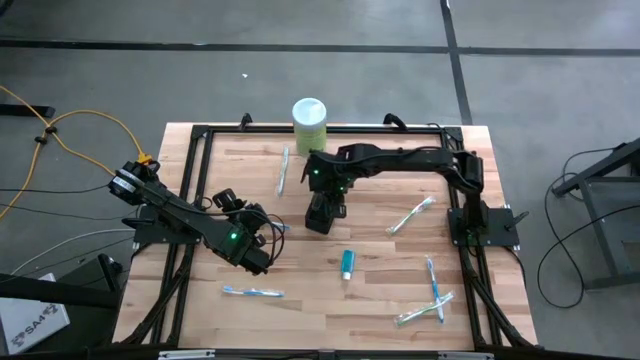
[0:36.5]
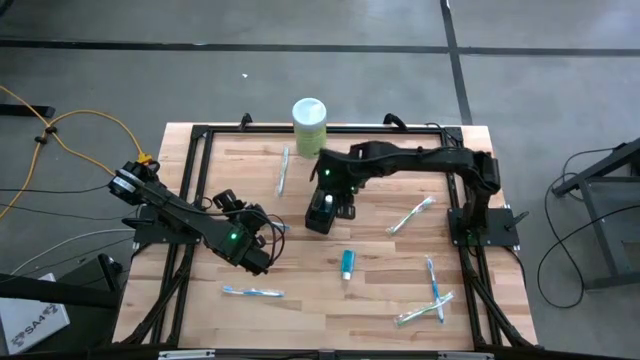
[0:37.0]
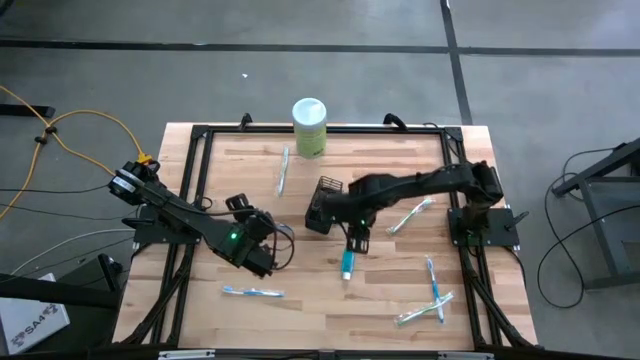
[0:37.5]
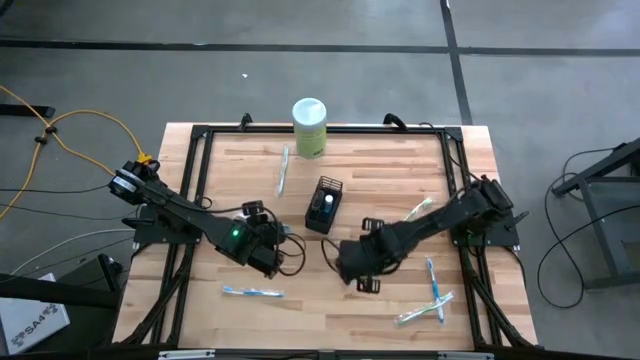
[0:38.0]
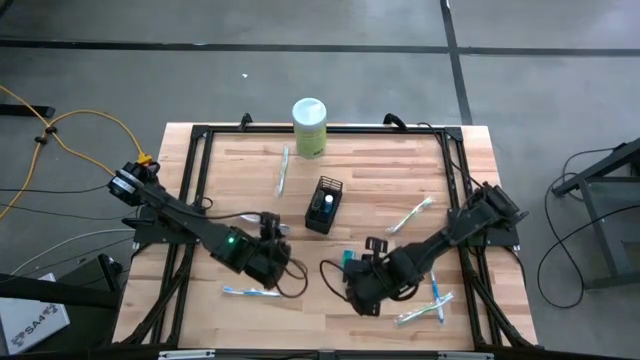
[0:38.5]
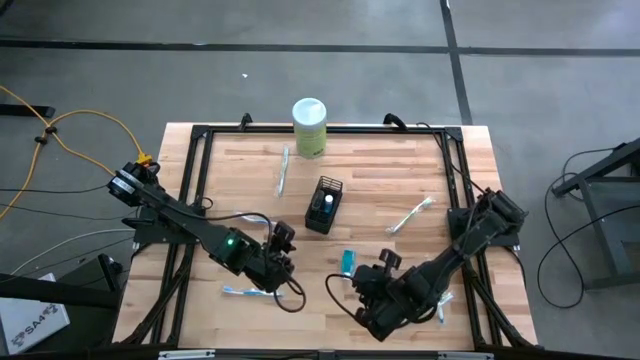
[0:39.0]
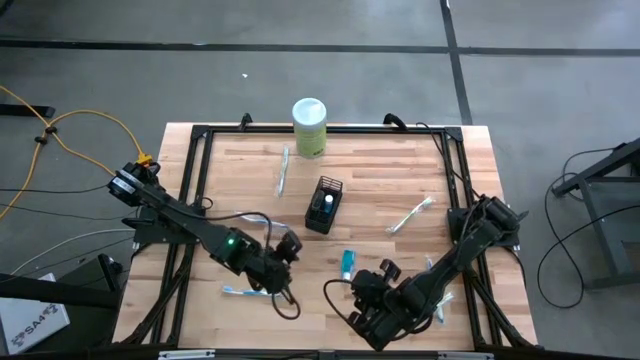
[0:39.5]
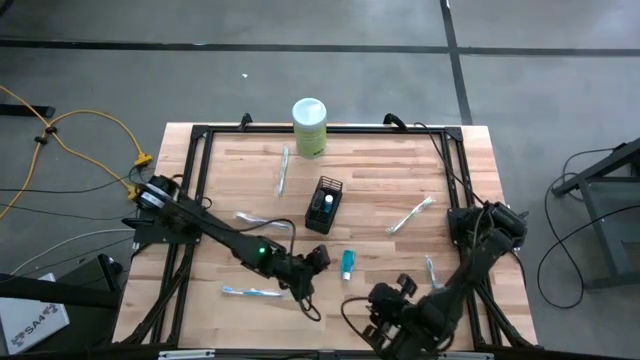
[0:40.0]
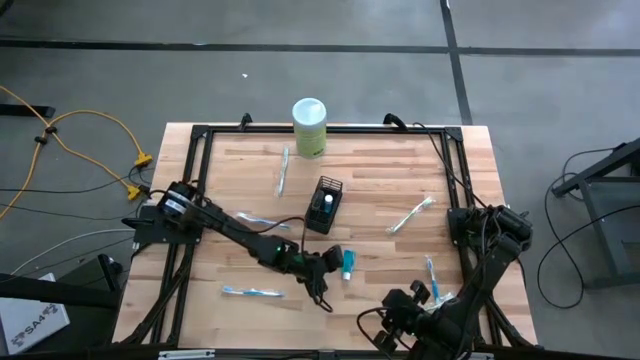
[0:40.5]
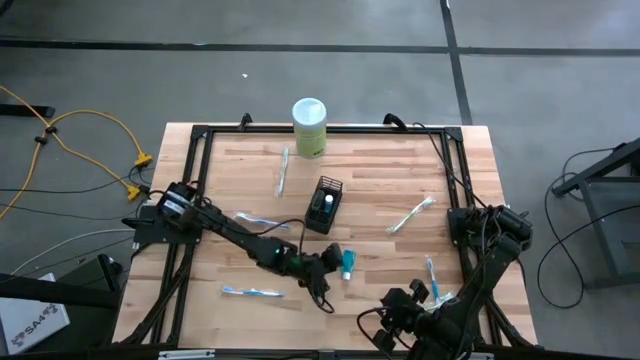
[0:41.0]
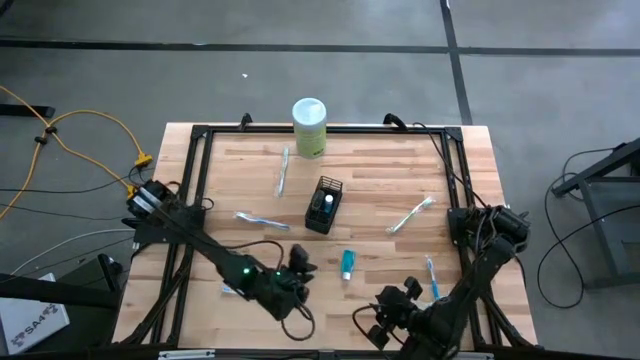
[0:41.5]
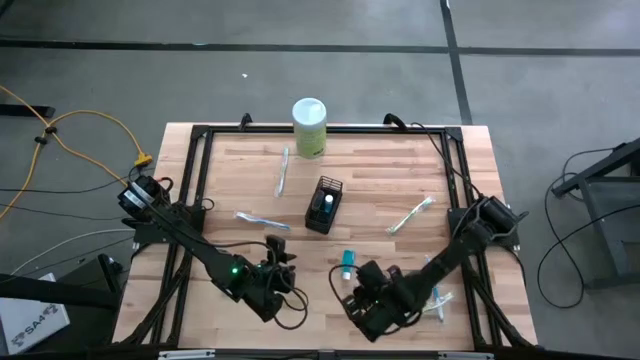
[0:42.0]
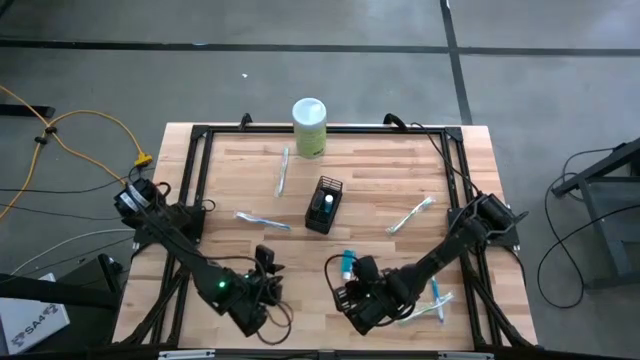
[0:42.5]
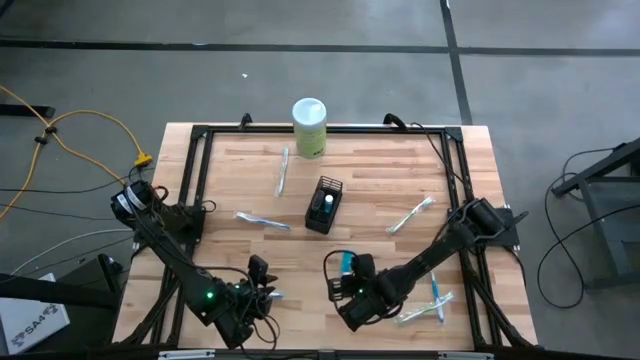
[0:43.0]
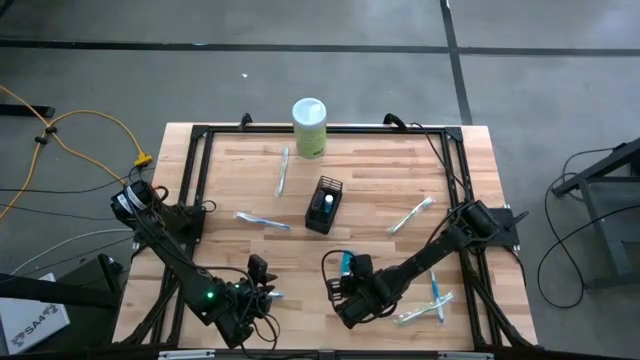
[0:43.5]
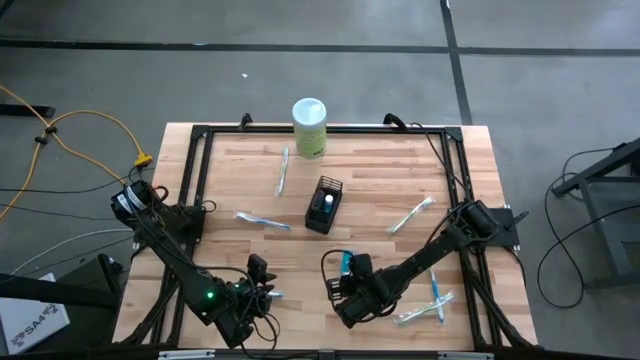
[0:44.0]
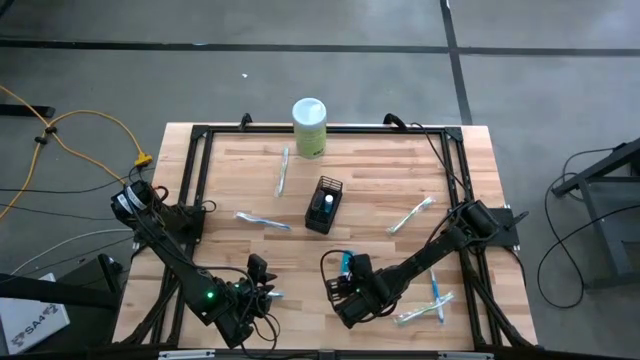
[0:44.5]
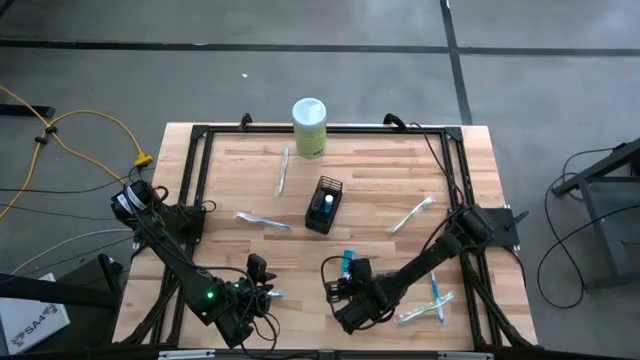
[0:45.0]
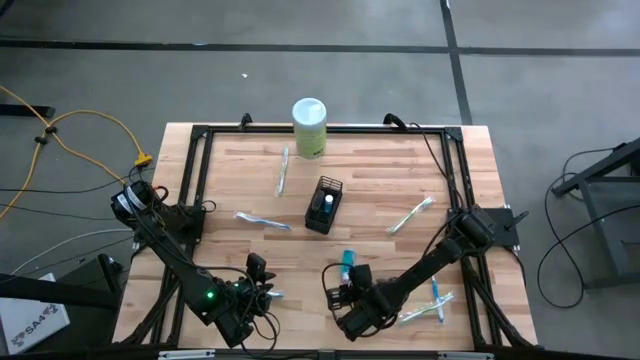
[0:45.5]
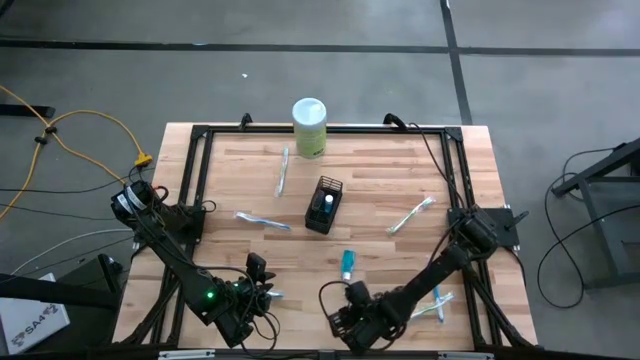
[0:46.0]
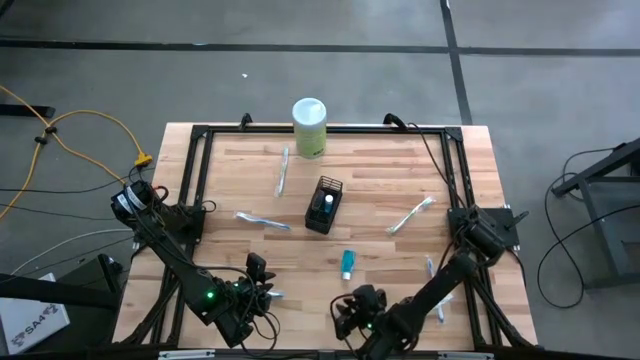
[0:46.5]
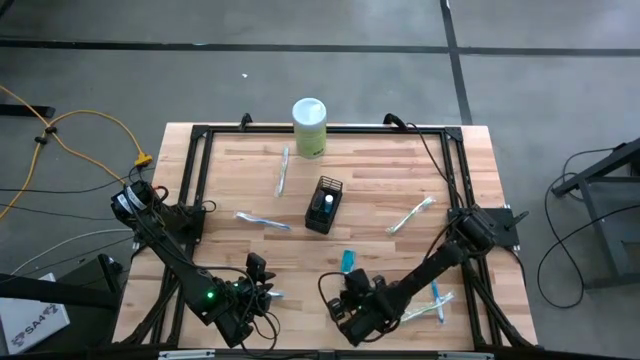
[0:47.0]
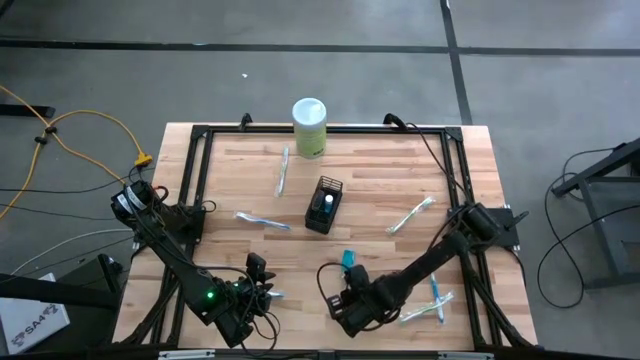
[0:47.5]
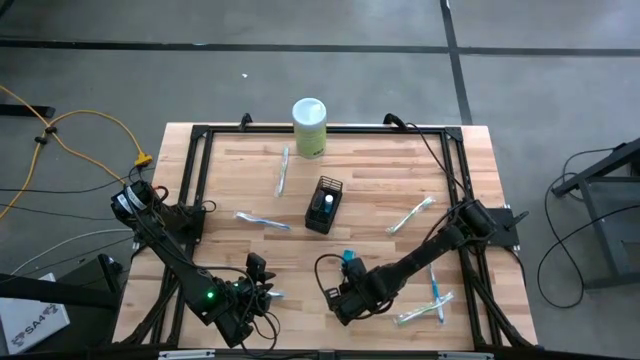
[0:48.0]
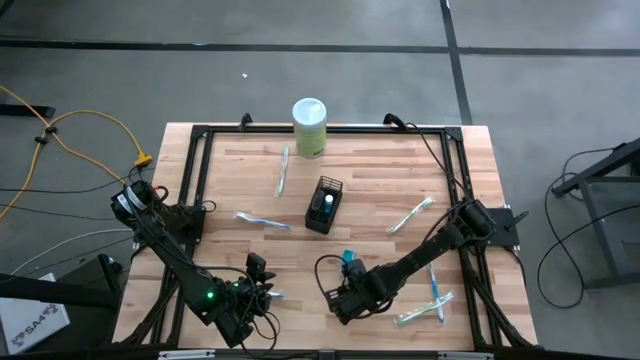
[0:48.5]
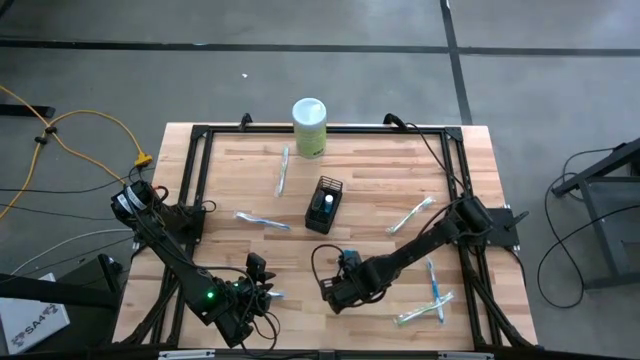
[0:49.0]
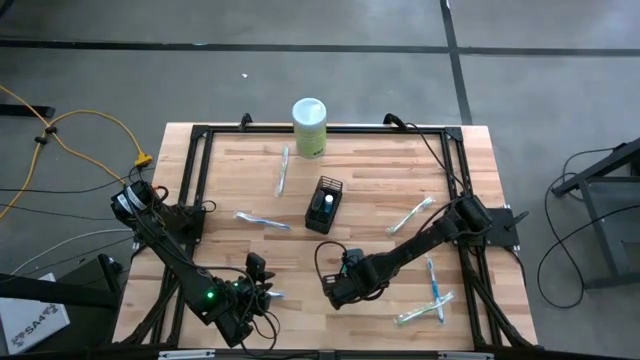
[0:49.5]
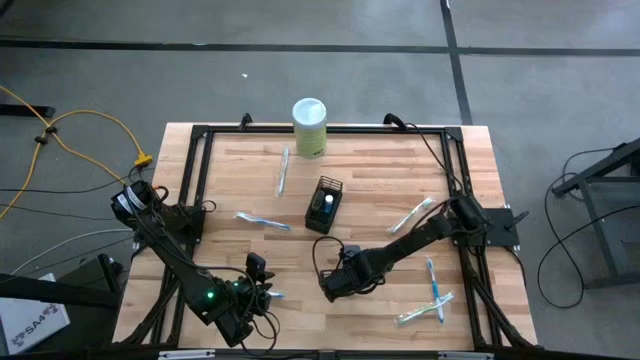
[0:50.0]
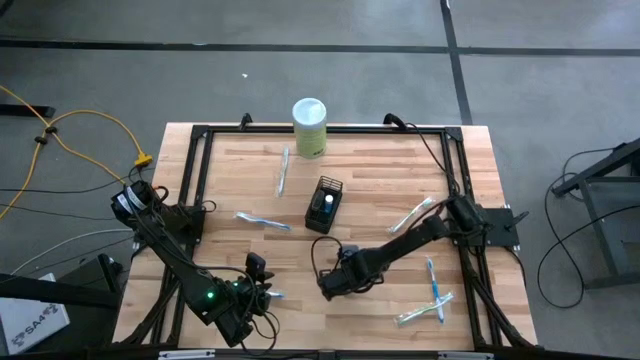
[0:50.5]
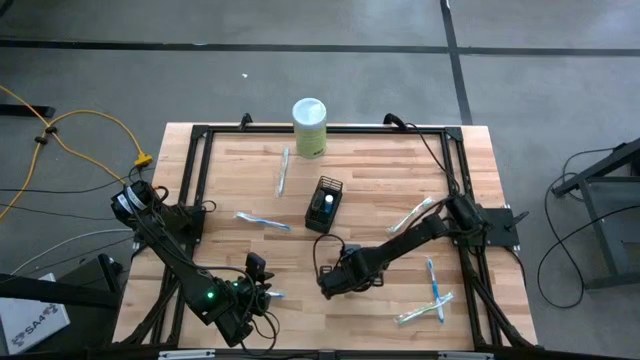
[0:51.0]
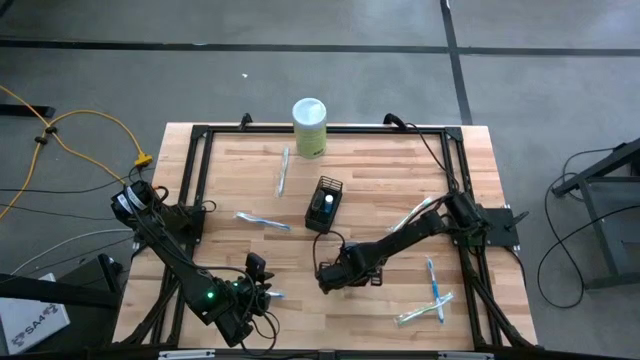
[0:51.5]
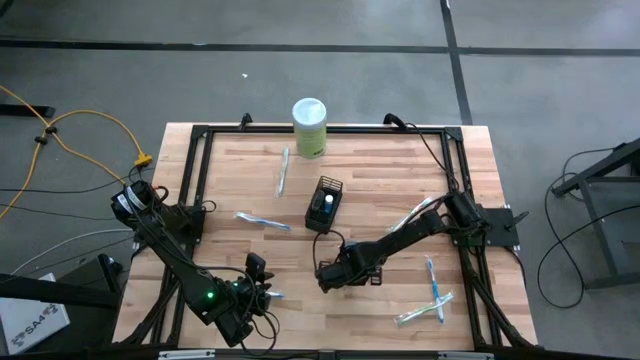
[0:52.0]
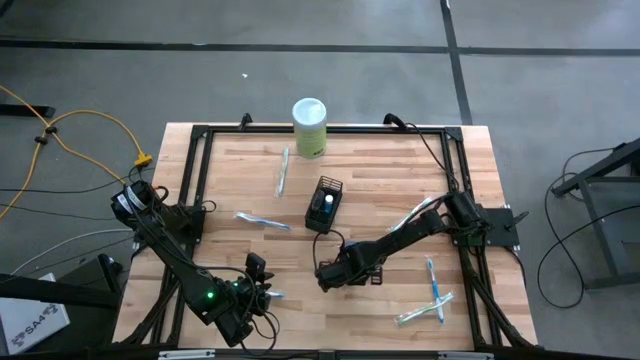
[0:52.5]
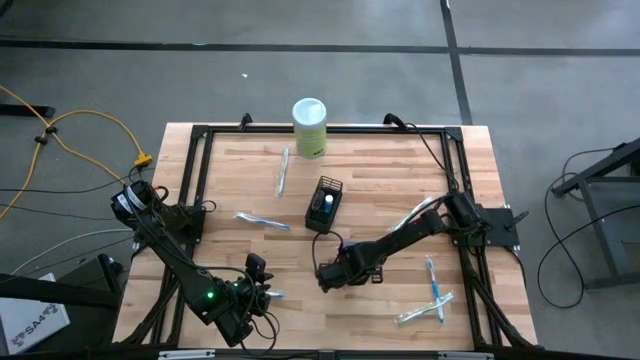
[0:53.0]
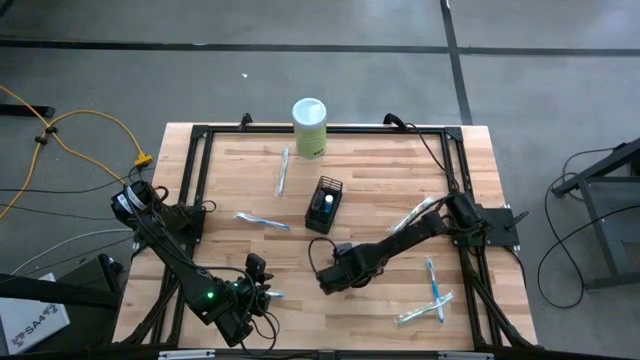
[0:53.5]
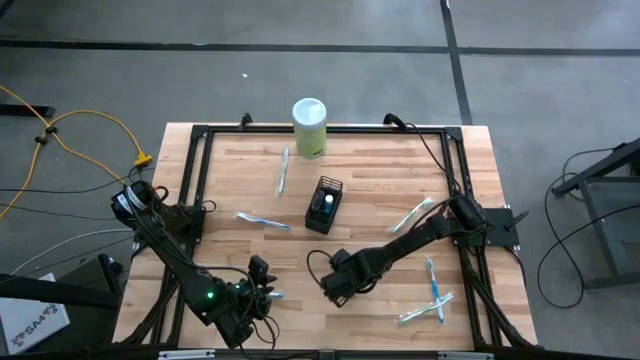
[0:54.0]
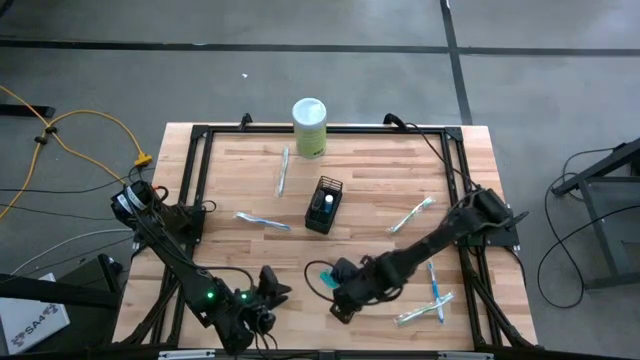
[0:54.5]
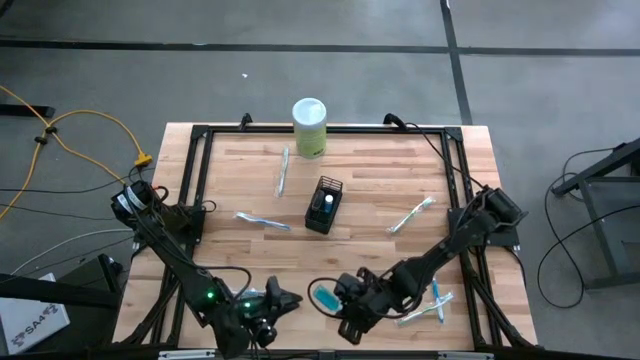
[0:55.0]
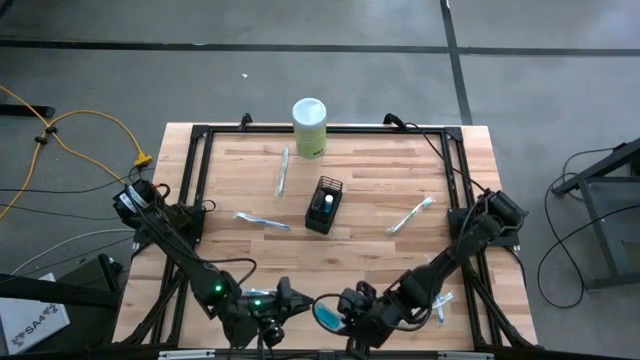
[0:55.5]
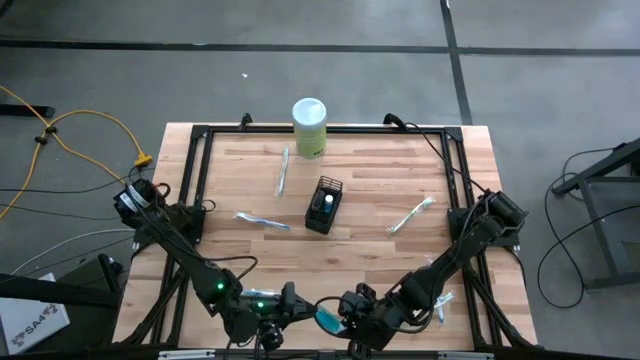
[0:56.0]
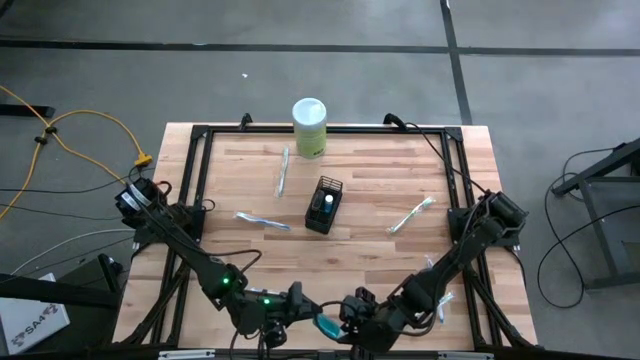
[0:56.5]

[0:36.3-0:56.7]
Task: Pick & Place toothbrushing station
Put the blue mouthwash into the middle section of the black wire organizer
